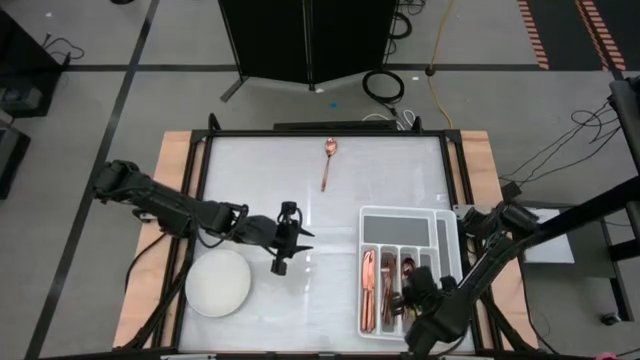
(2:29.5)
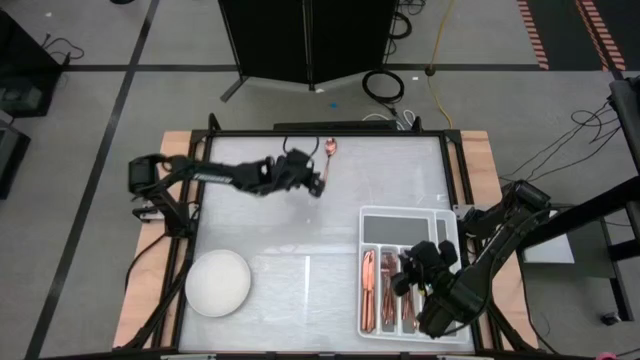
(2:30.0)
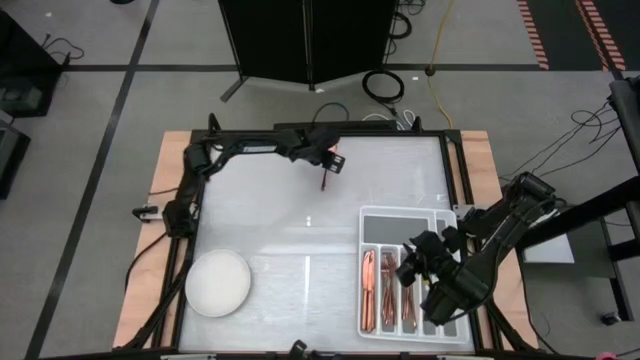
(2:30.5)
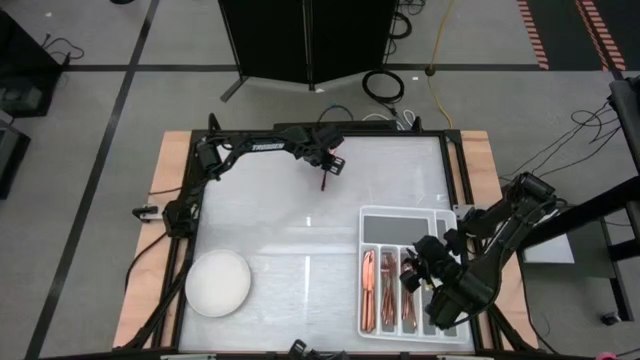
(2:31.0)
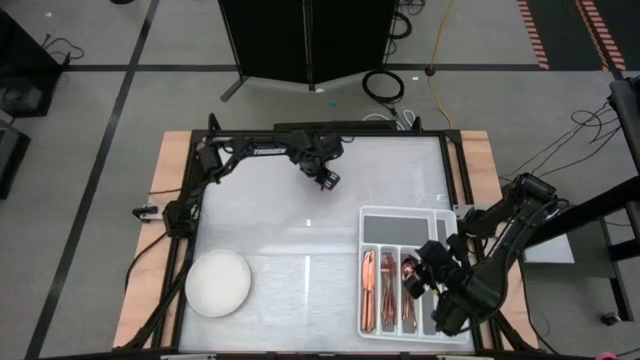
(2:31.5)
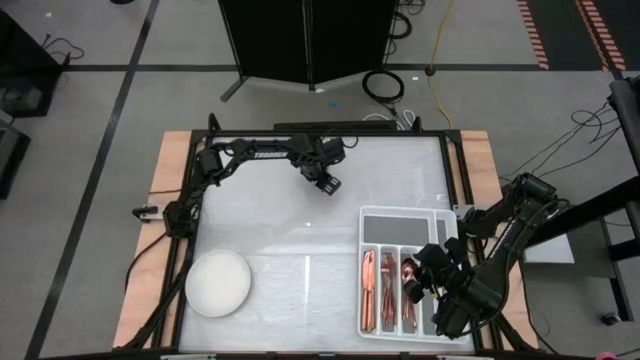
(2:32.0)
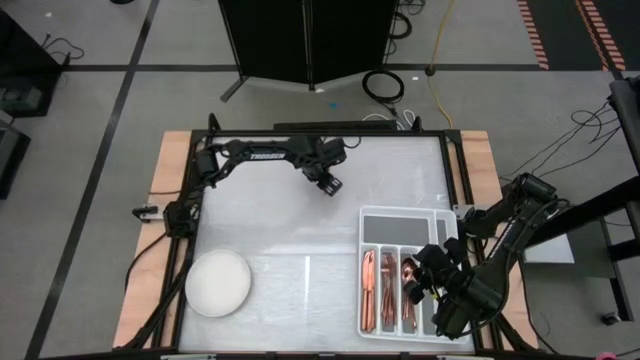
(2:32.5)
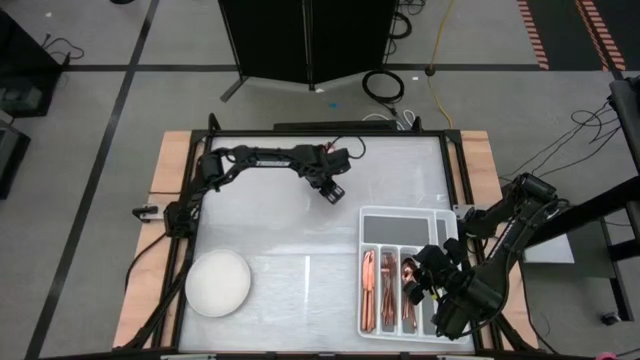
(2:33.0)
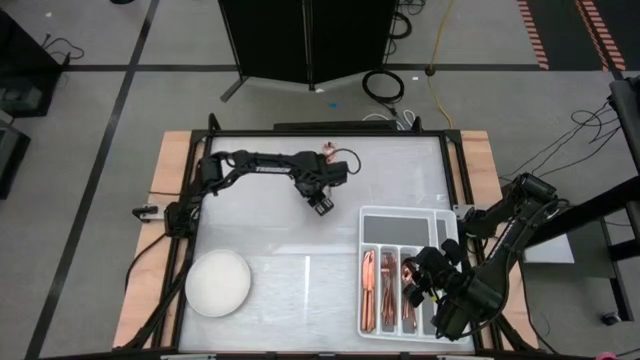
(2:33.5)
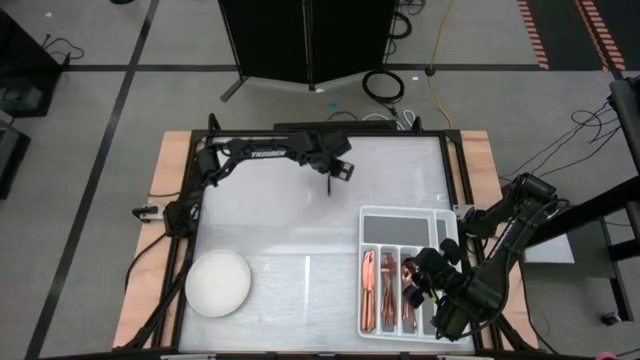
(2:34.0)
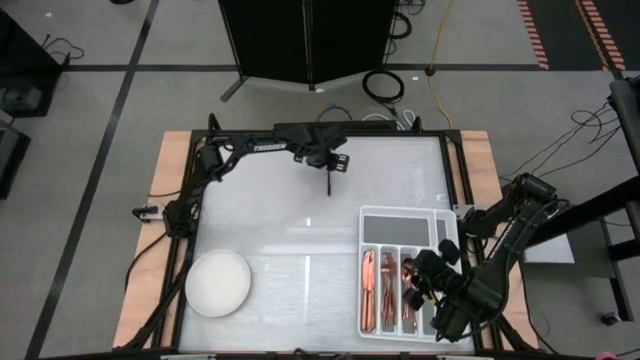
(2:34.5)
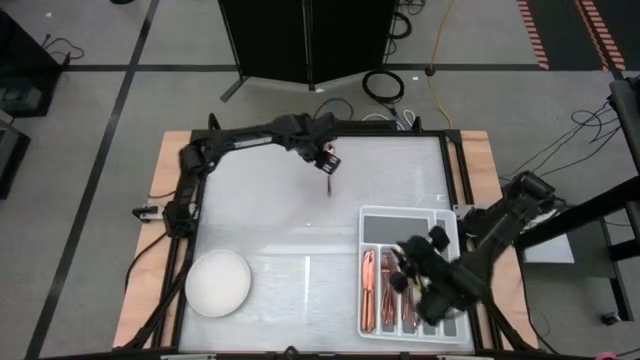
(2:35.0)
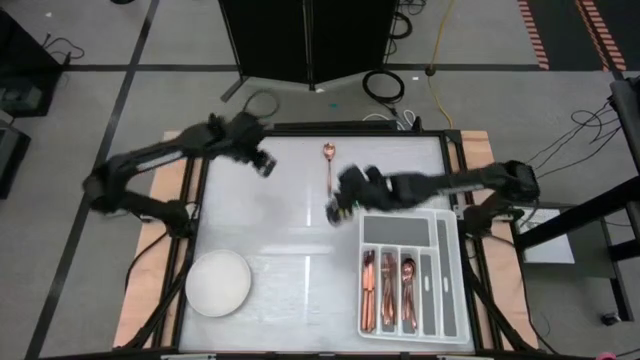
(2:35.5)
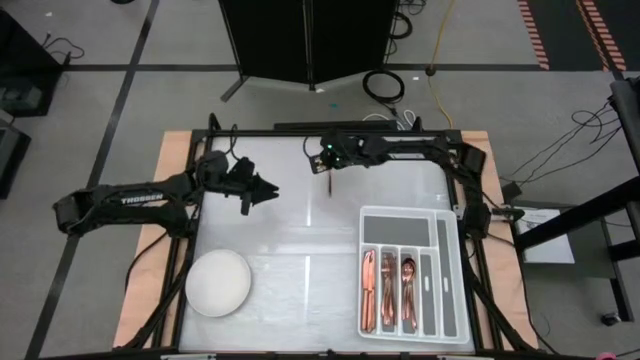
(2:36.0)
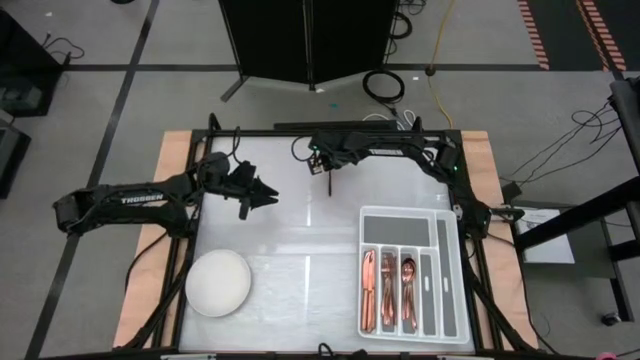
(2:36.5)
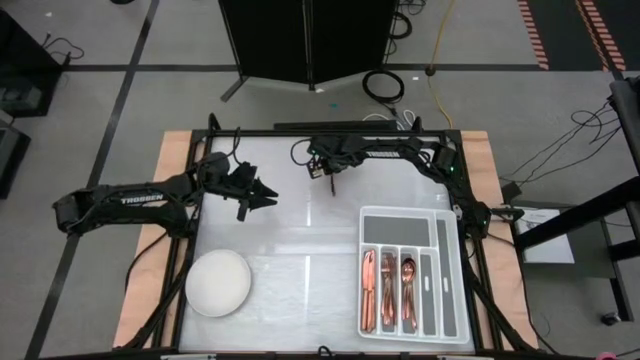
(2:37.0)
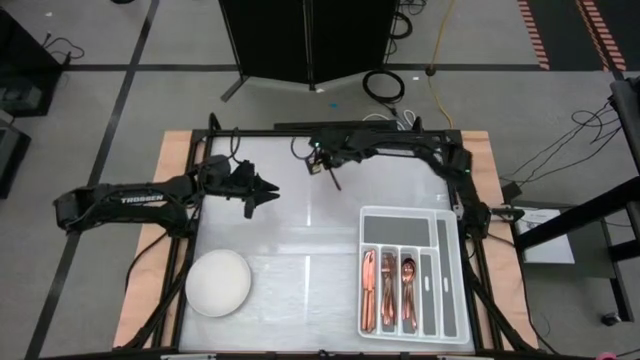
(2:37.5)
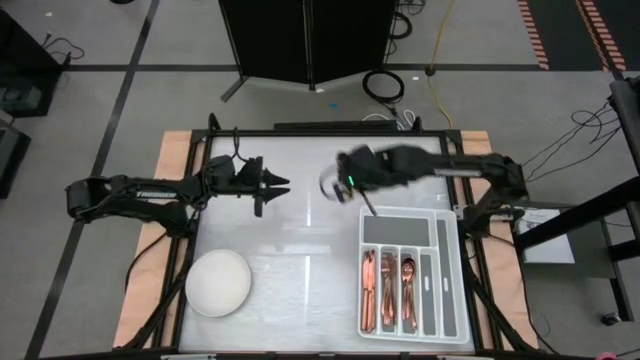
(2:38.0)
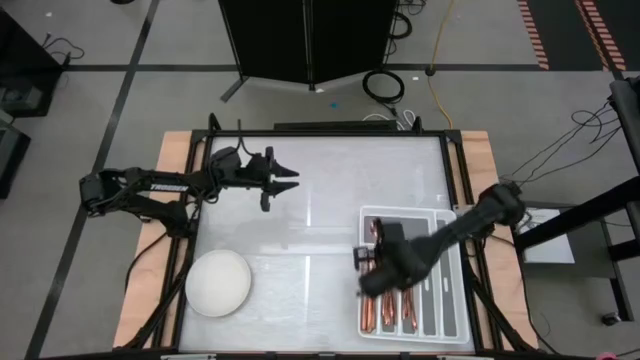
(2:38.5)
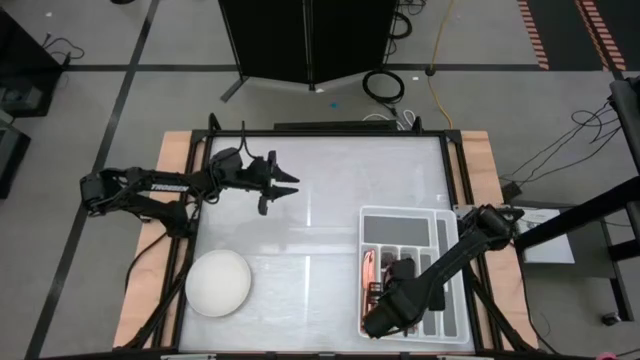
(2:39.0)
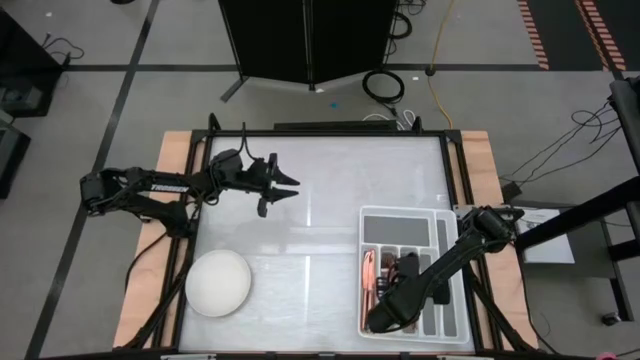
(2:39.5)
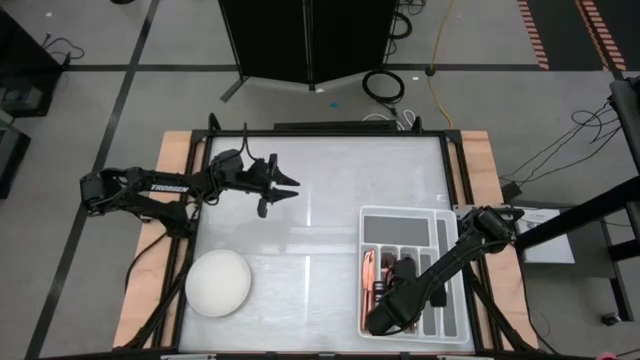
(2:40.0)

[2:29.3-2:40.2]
Task: Sort silverware
Put the brown spoon in the white silverware organizer

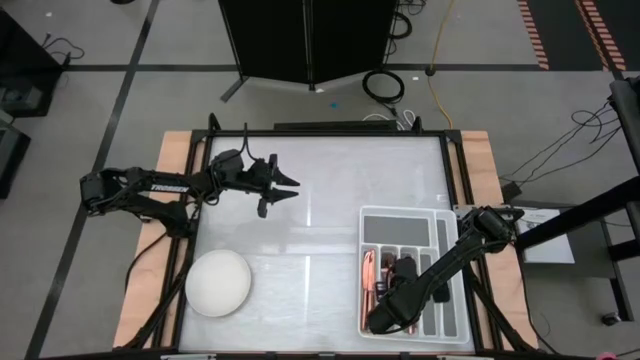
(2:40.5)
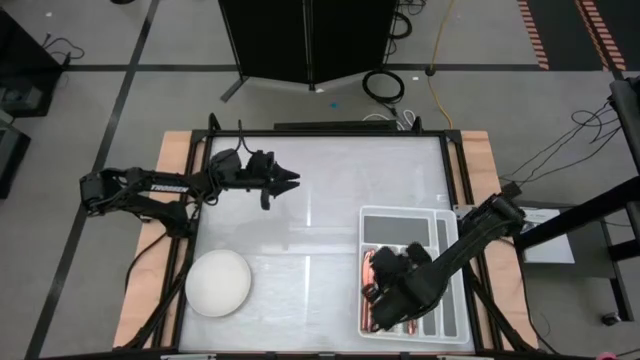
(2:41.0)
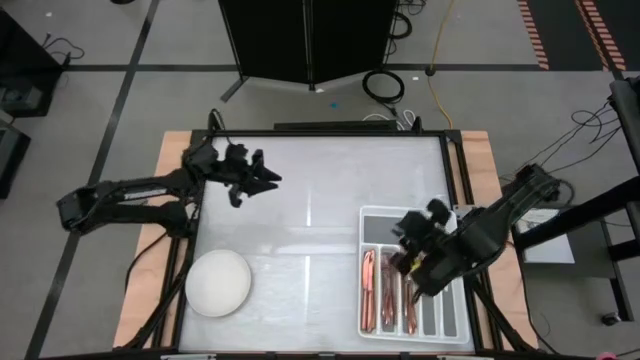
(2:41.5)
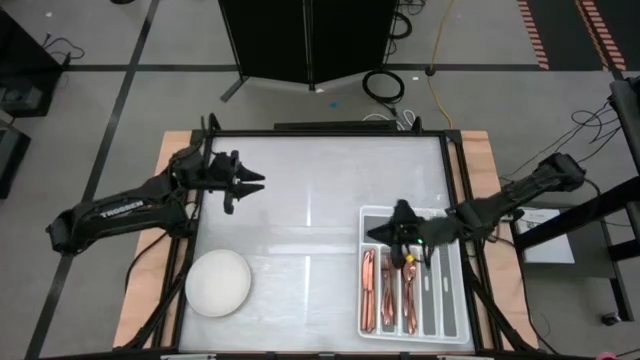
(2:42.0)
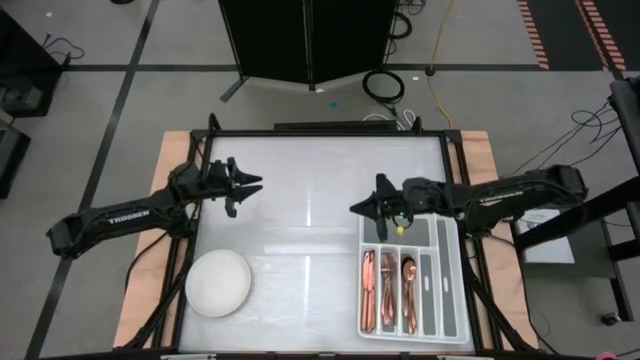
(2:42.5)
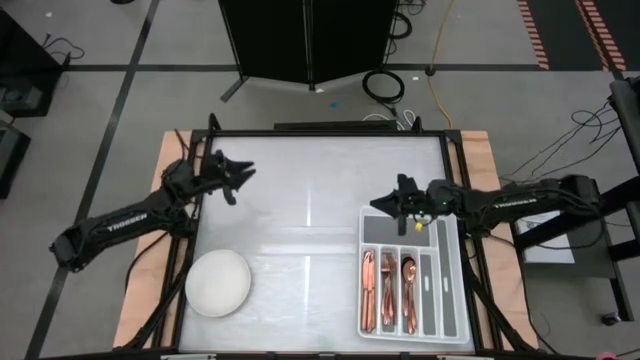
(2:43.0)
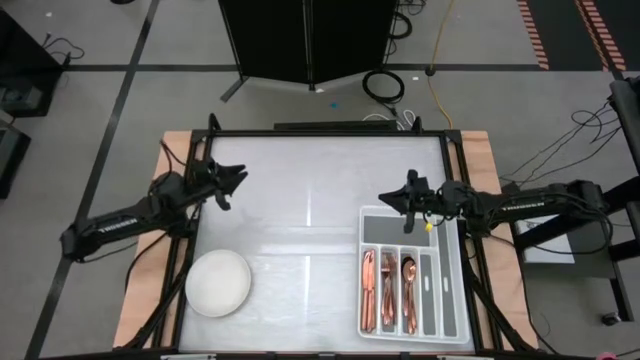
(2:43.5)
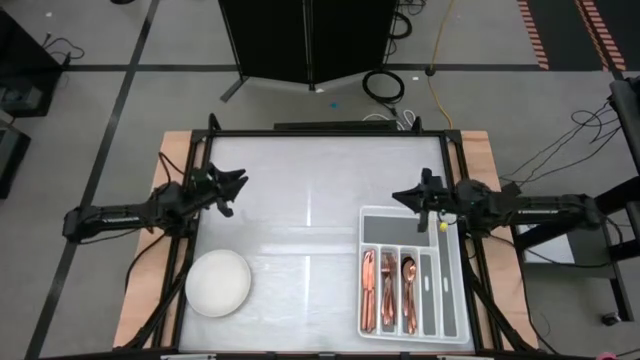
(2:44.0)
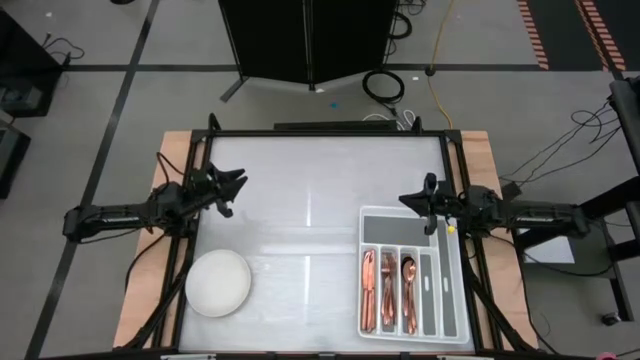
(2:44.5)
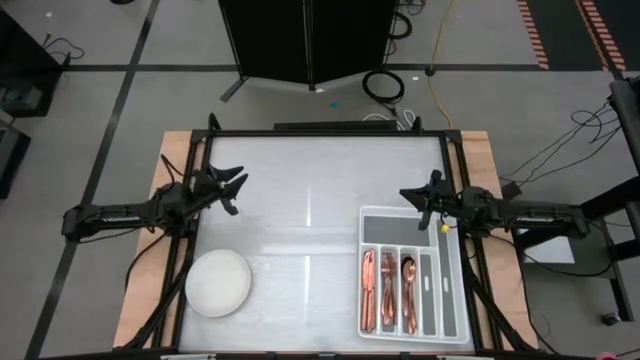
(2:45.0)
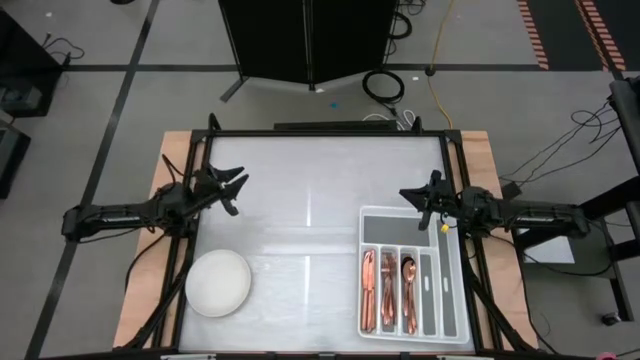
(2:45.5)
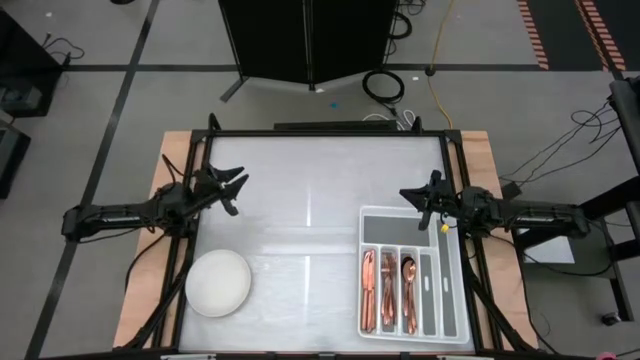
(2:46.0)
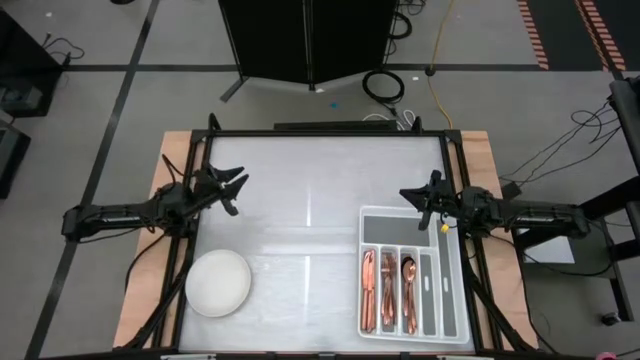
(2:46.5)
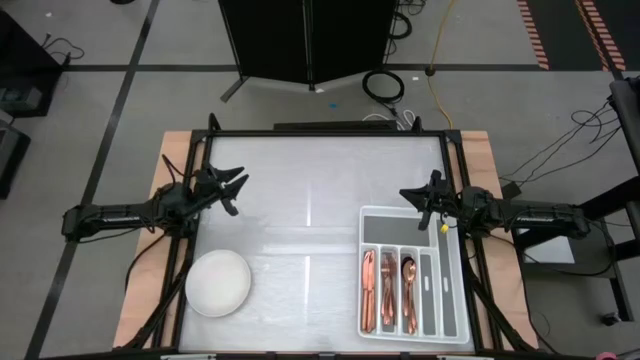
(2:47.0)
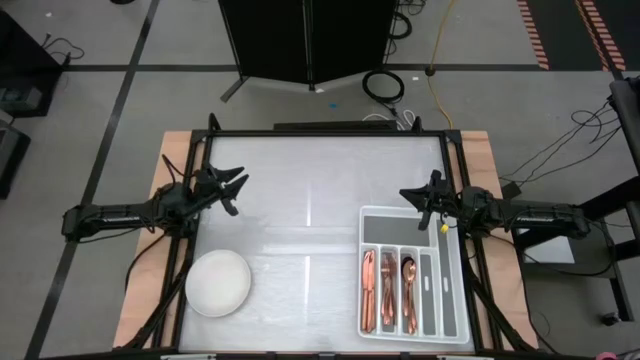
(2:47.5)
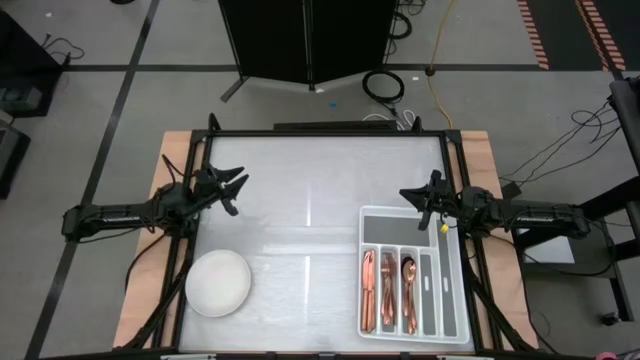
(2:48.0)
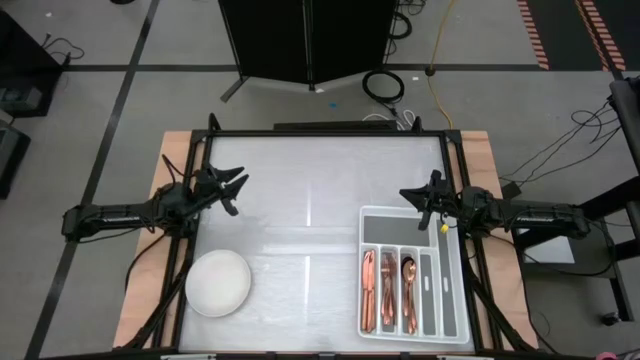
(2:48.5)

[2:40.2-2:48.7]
Return to Home Position

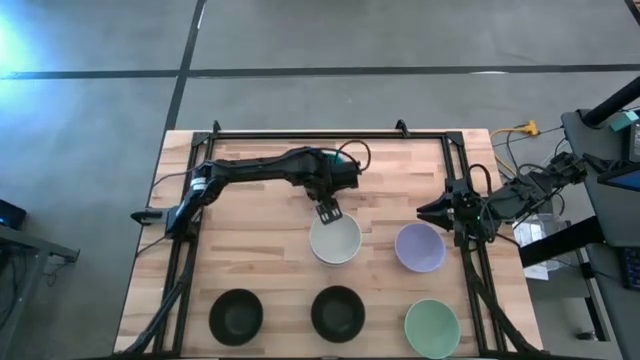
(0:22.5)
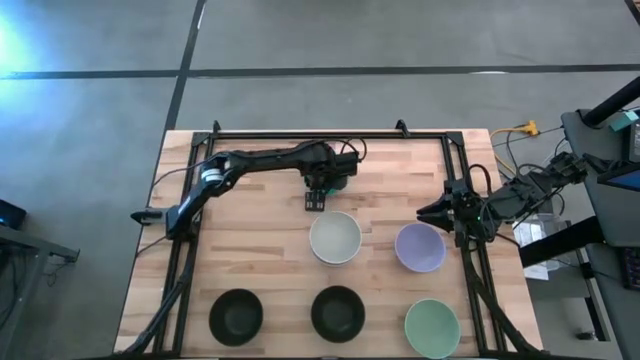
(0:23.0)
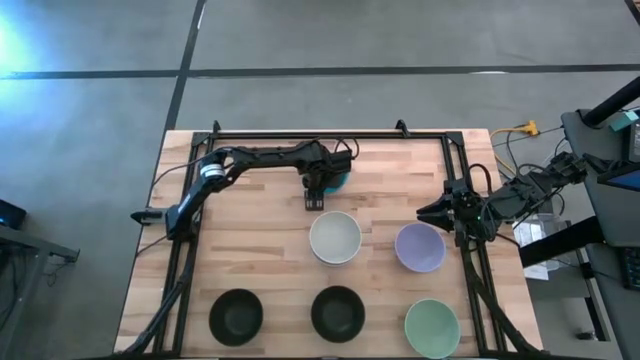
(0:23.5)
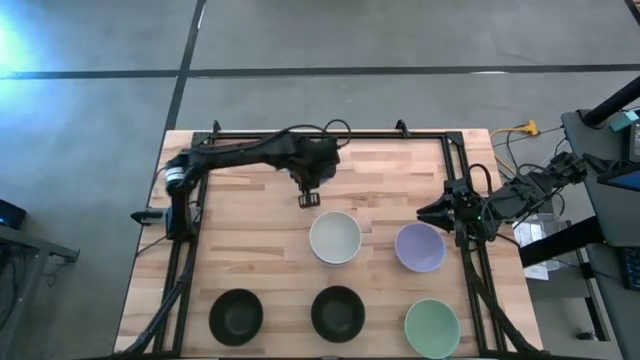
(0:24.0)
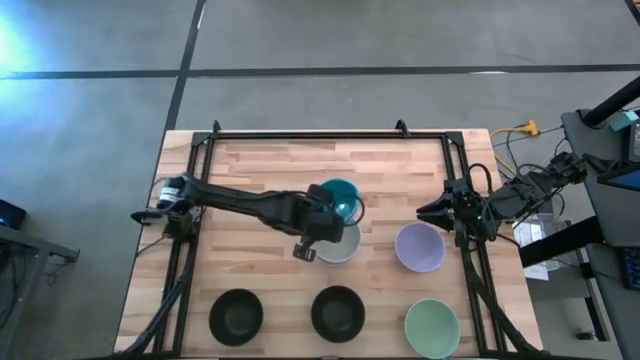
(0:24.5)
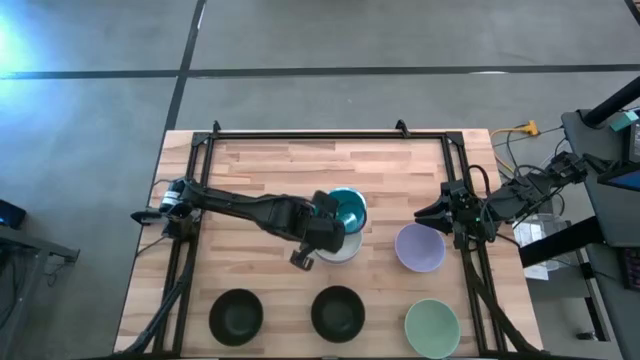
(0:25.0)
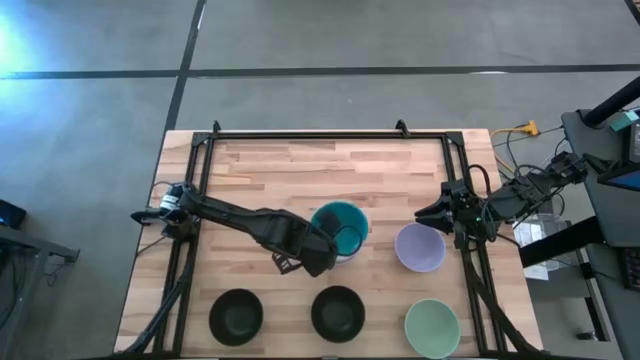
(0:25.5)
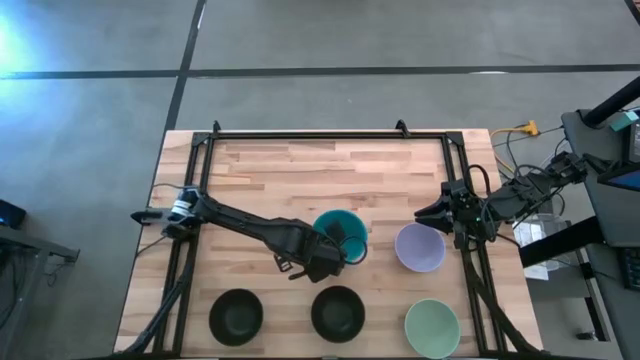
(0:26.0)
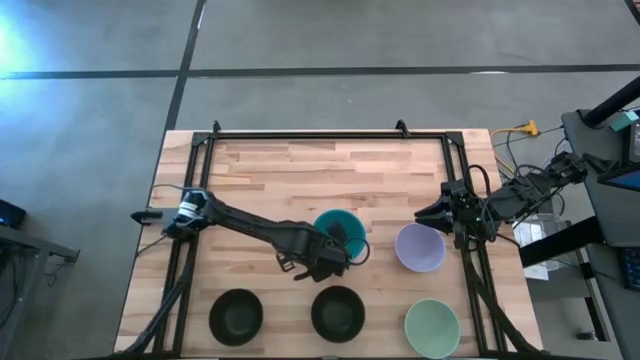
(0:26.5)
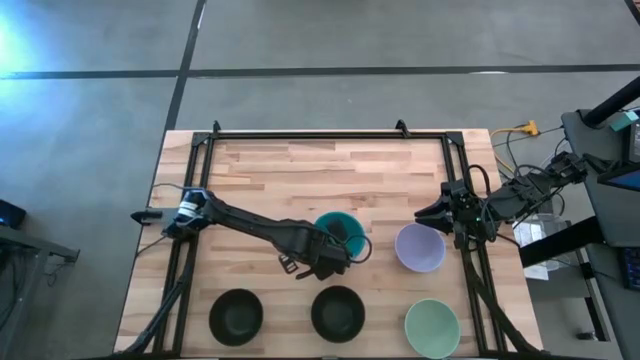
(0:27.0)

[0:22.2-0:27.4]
Task: Nest bowls inside each other
Stack the blue bowl on top of the white bowl
